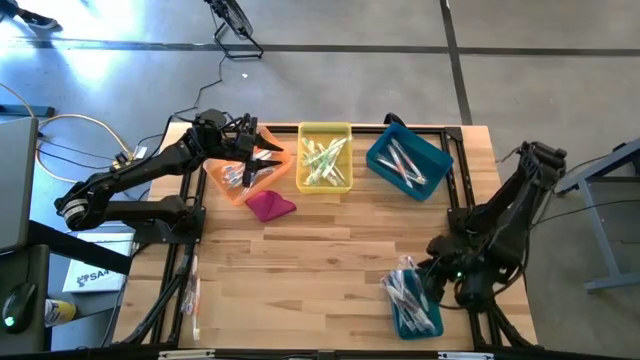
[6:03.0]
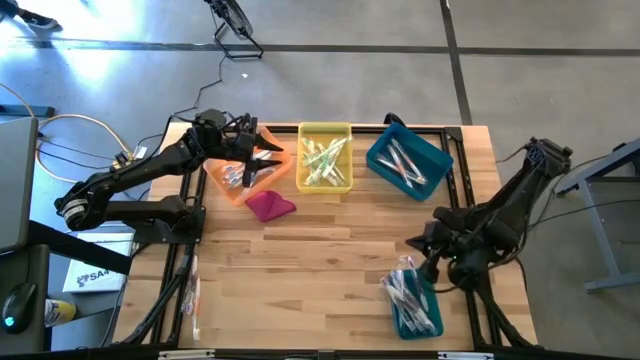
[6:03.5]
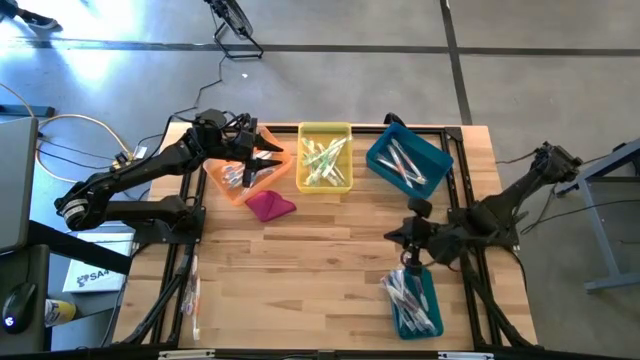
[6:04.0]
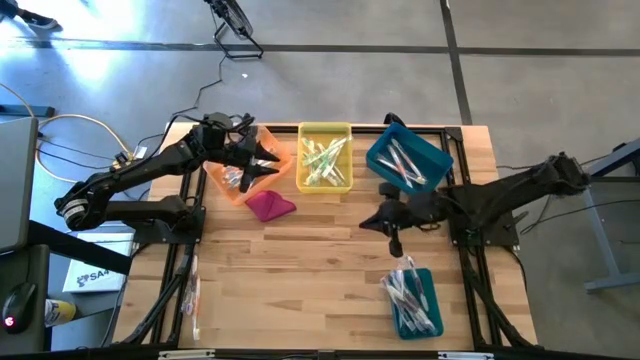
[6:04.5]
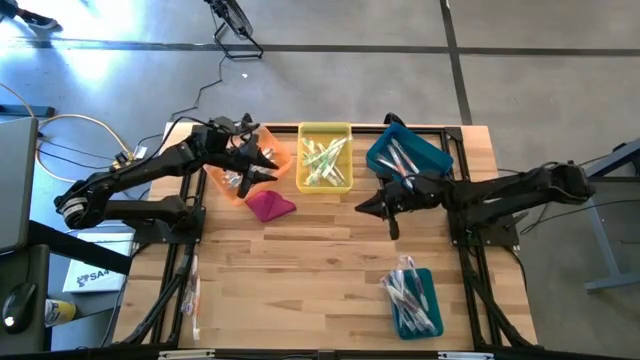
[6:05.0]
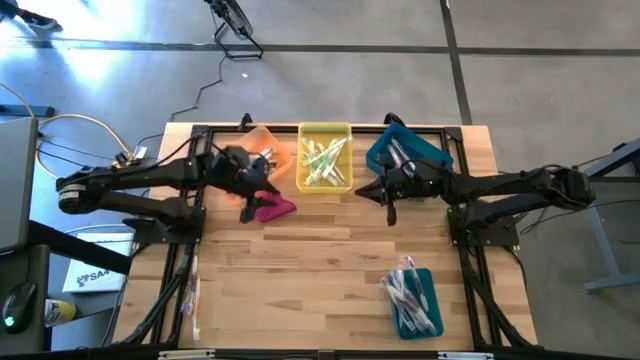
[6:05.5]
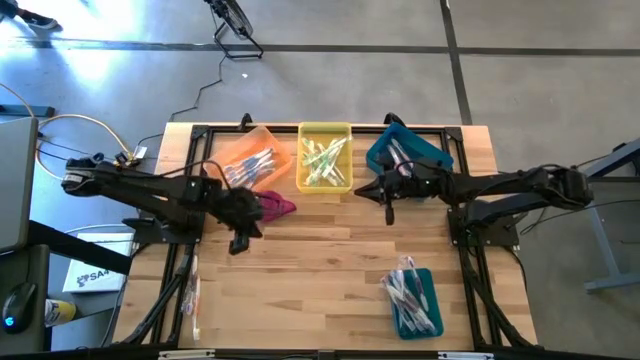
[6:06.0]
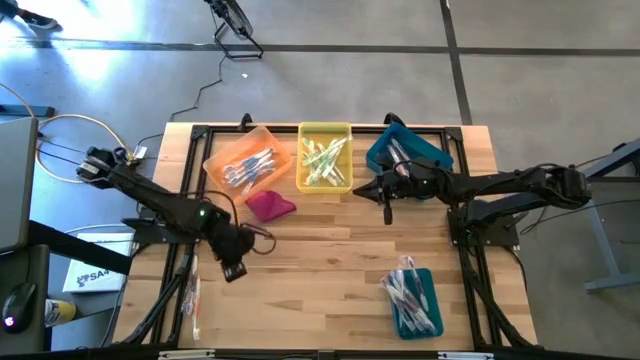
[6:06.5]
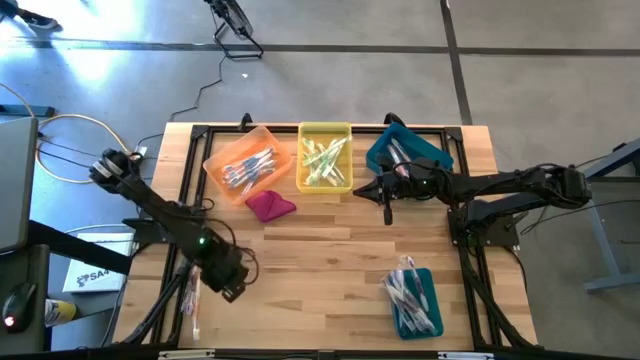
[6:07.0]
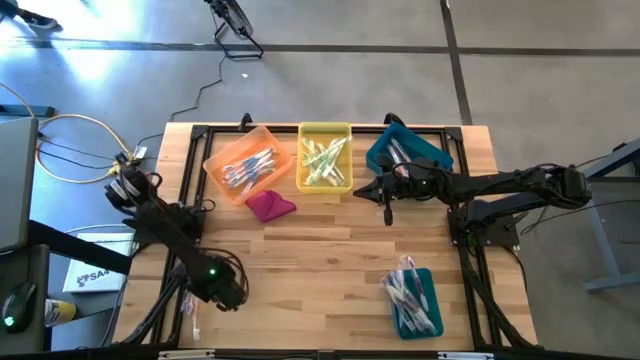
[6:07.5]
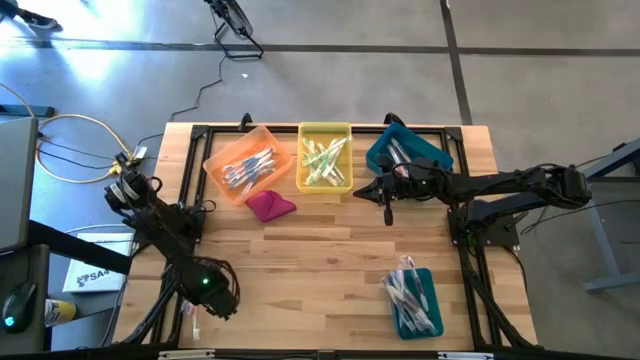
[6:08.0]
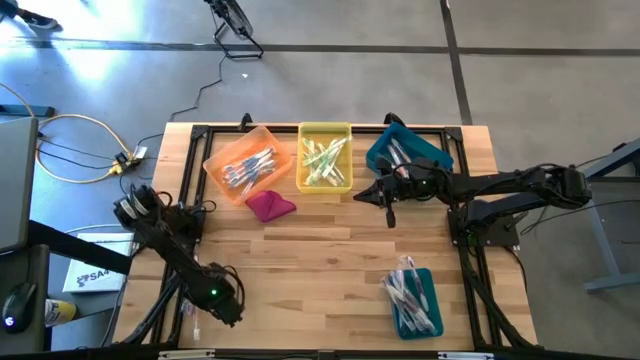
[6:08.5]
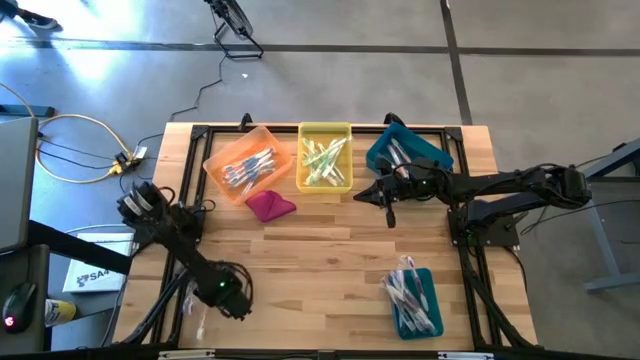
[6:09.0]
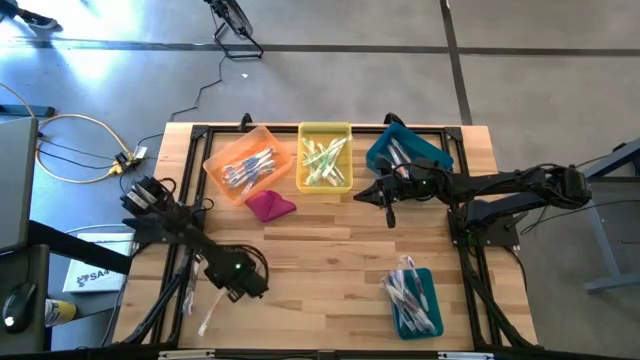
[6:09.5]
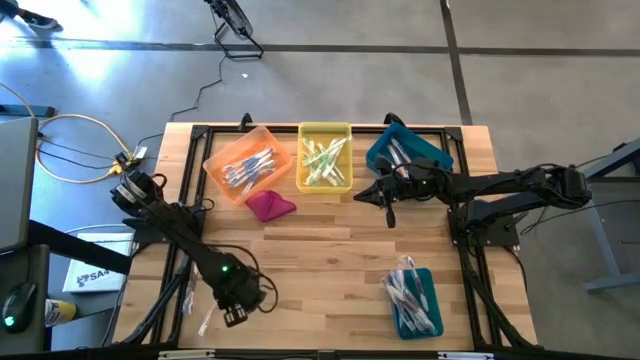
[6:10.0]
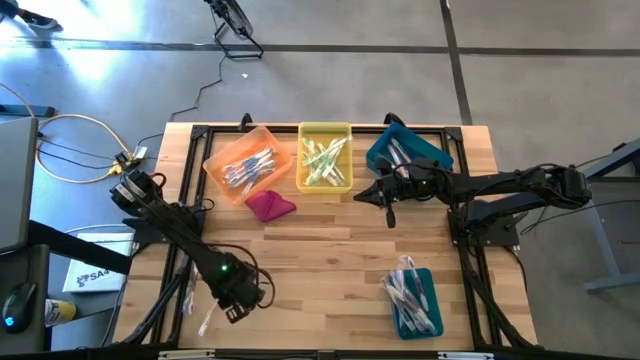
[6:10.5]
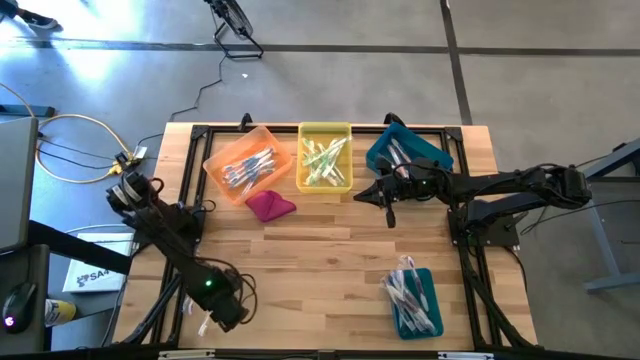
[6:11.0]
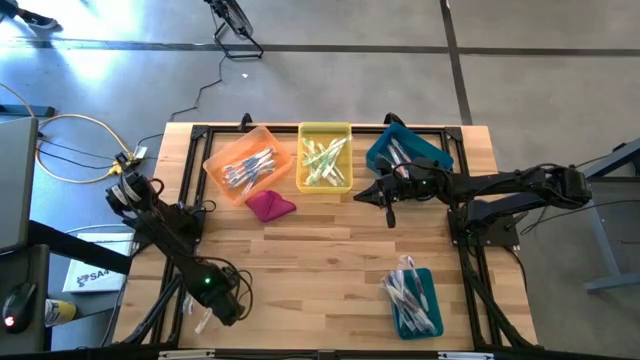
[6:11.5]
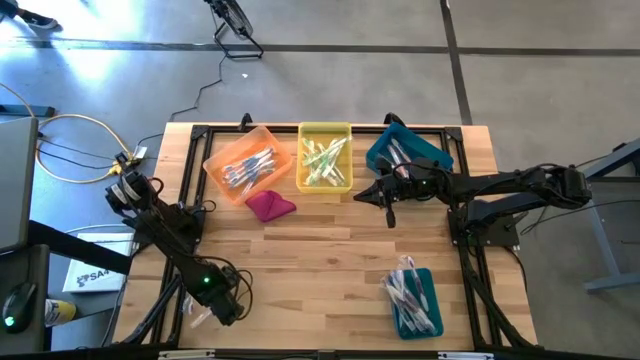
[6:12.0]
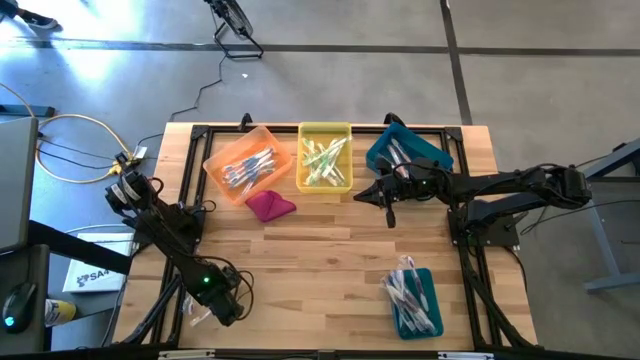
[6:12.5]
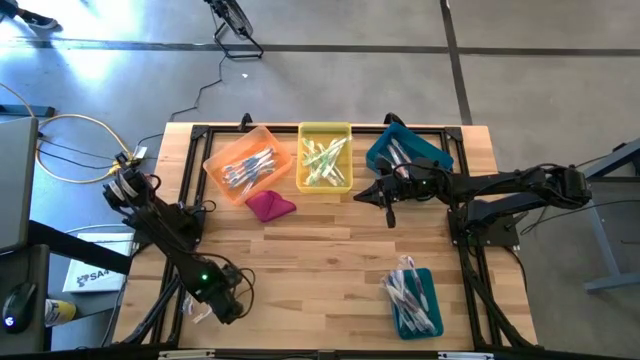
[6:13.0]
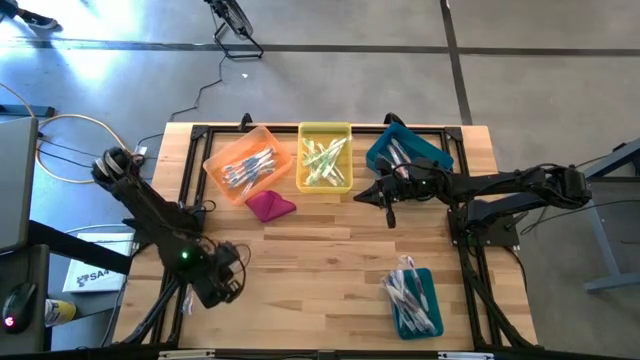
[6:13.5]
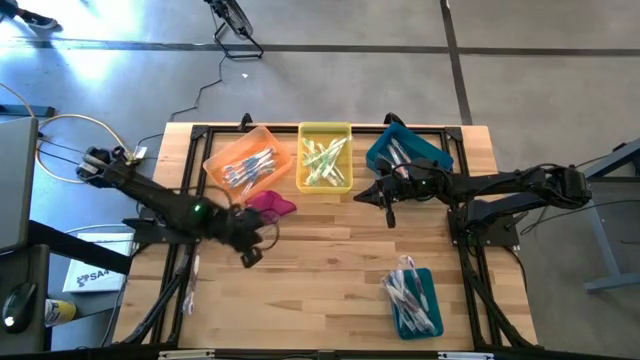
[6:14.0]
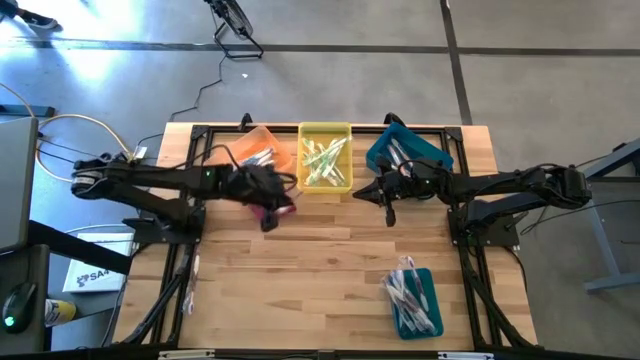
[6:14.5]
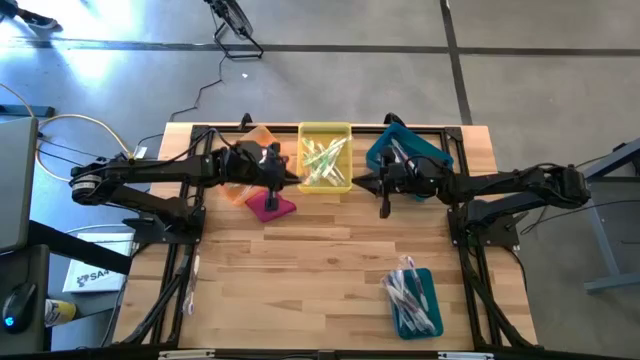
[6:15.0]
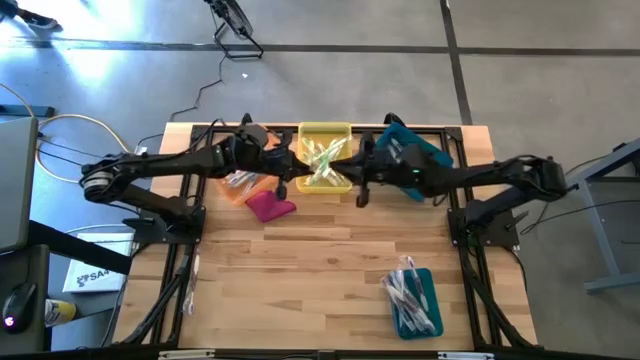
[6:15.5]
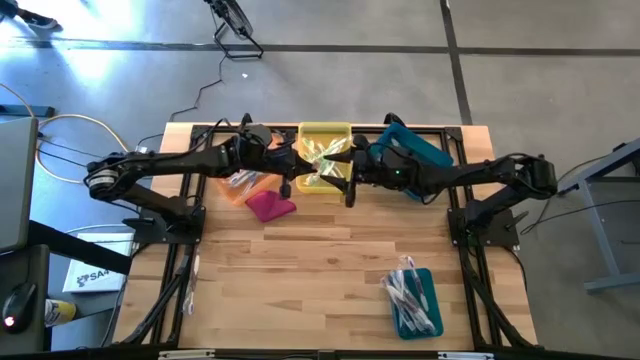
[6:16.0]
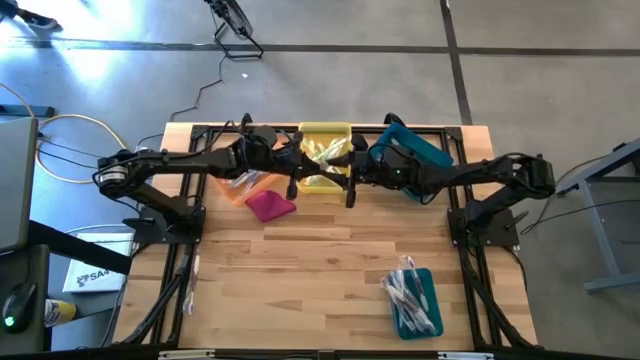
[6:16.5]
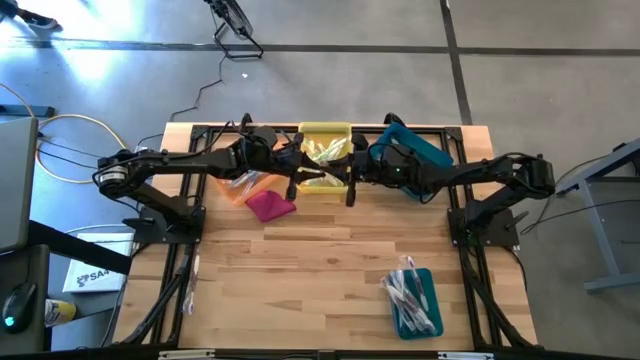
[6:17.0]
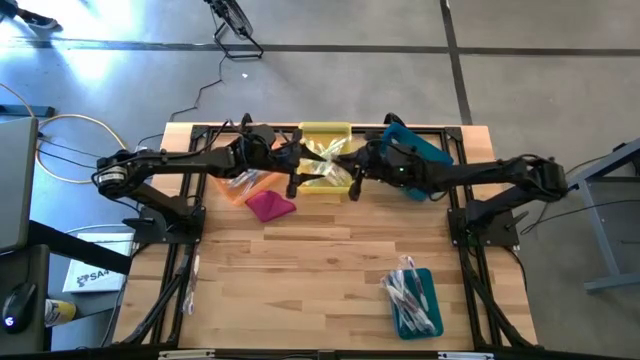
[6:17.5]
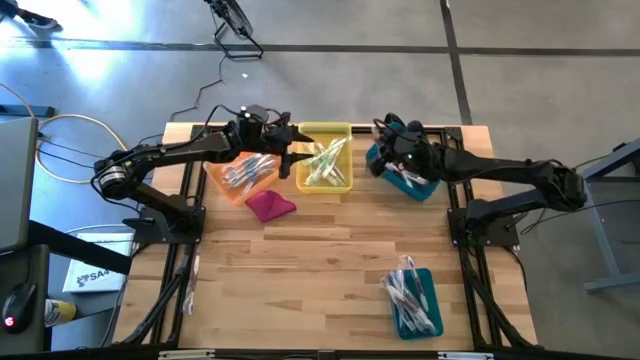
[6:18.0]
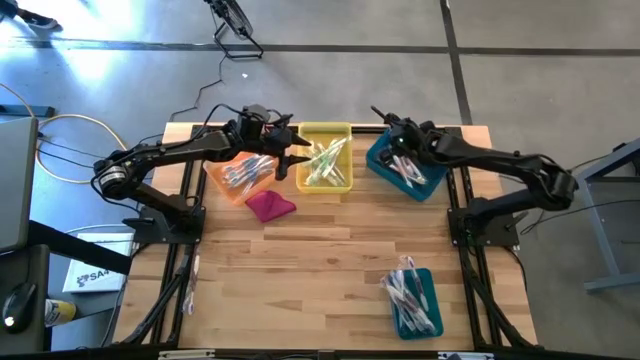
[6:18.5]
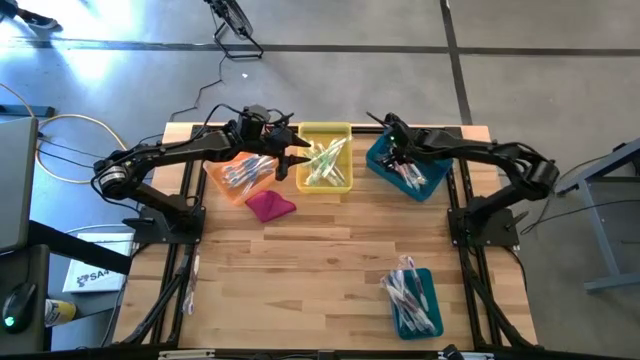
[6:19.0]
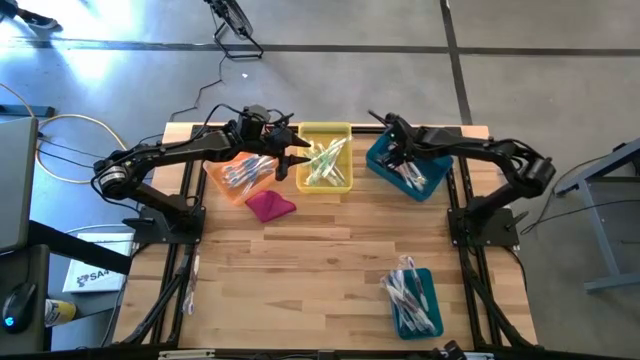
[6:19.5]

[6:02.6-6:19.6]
Task: Pick & Place Toothbrushes
Put the orange toothbrush into the top blue bin

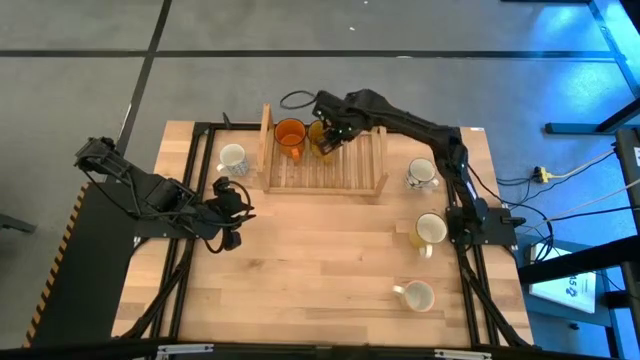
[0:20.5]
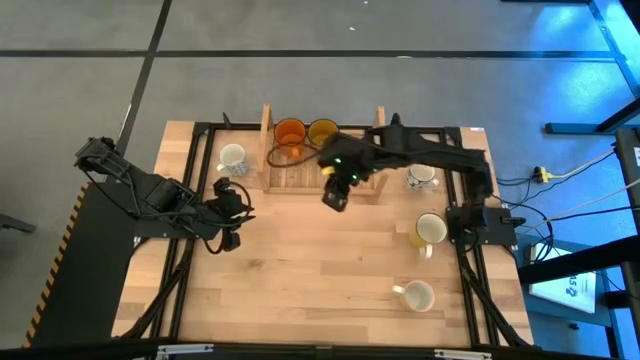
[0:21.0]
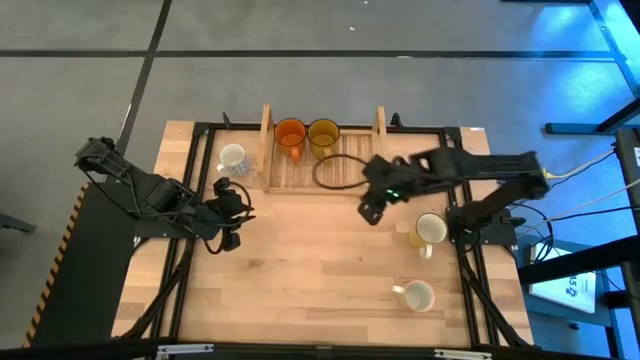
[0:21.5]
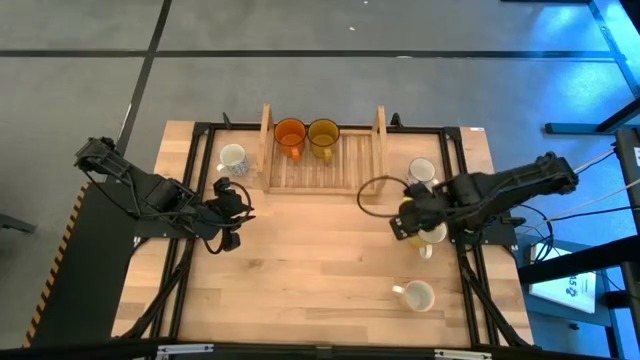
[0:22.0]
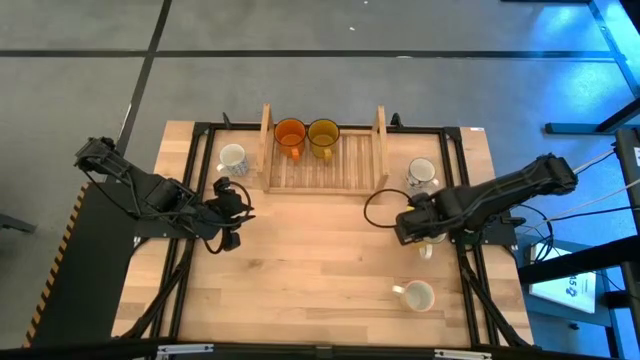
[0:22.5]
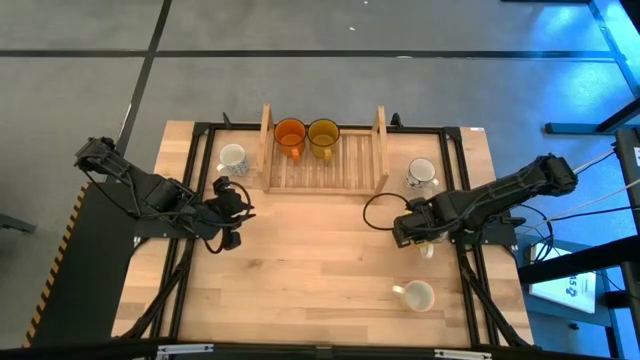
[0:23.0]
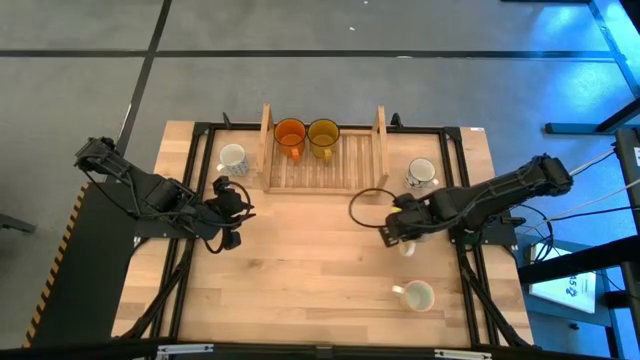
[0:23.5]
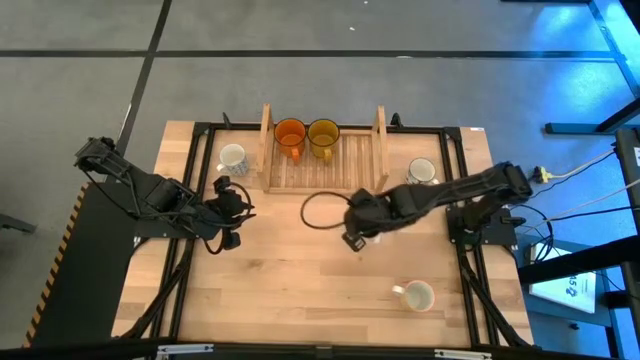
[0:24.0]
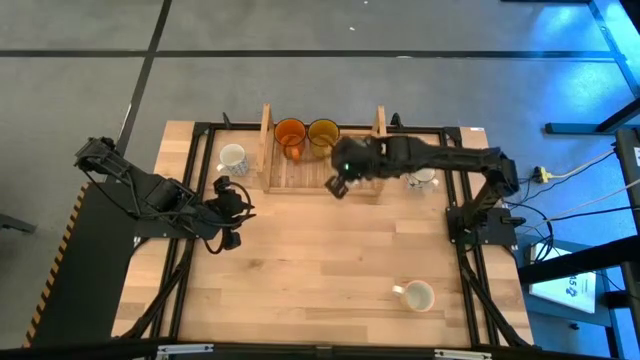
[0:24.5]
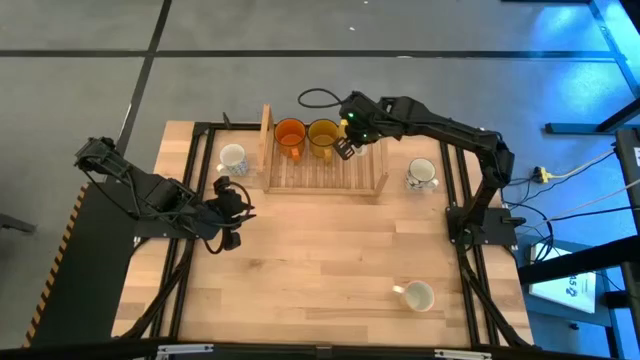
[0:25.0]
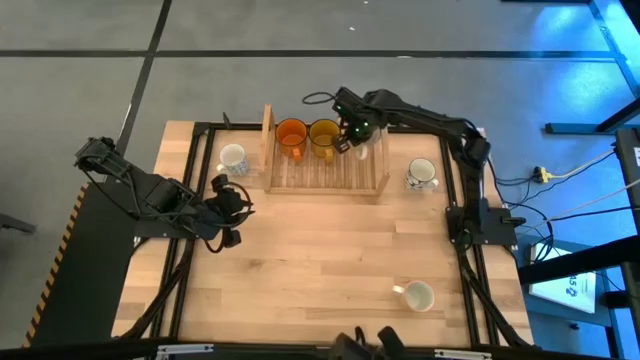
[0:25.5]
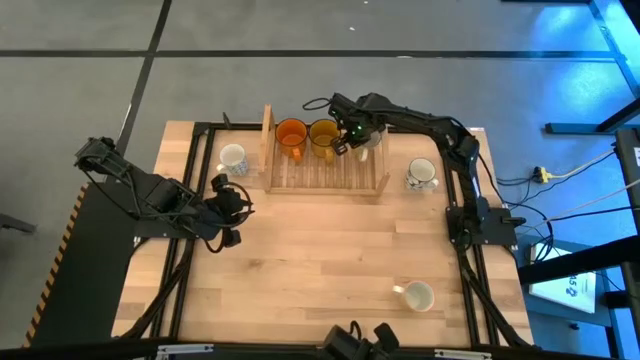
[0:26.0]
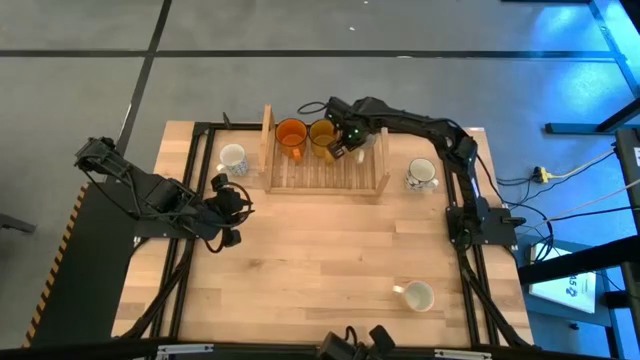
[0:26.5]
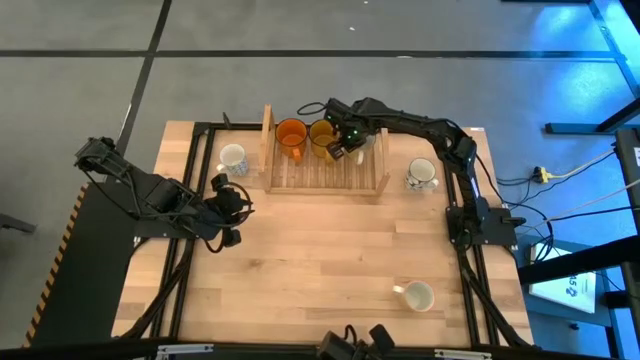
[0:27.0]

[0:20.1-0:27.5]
Task: Place coffee mugs
Put the yellow mug on the shelf
